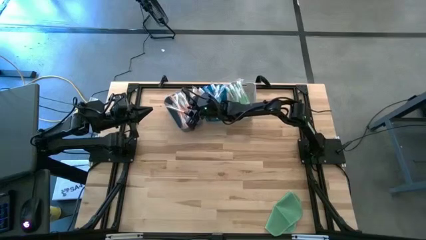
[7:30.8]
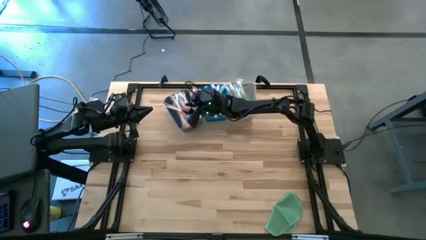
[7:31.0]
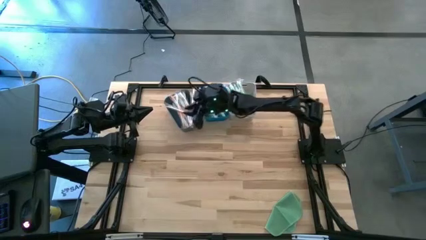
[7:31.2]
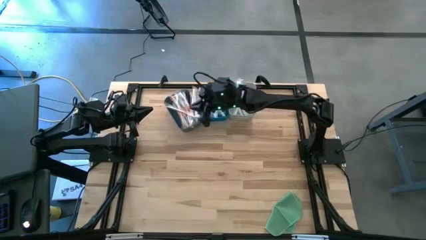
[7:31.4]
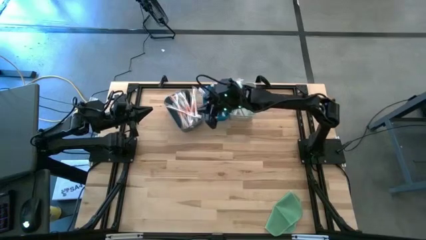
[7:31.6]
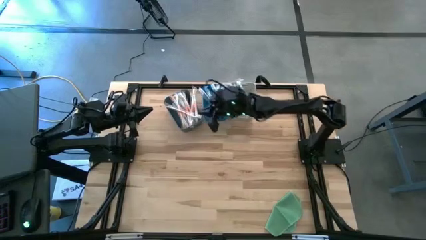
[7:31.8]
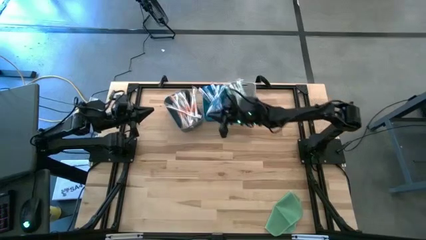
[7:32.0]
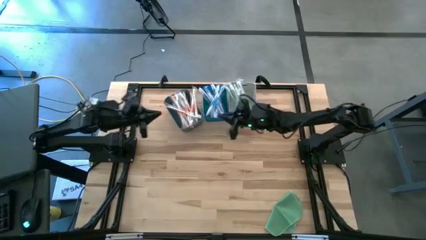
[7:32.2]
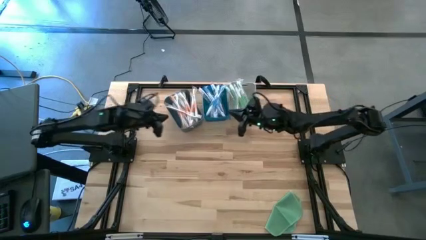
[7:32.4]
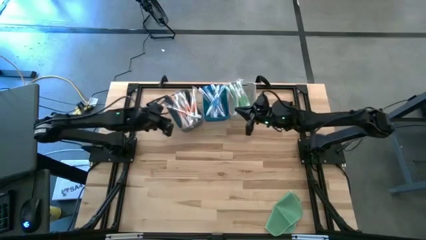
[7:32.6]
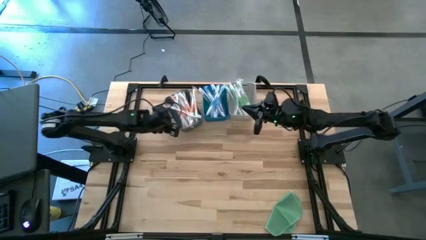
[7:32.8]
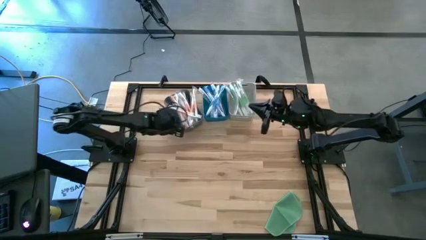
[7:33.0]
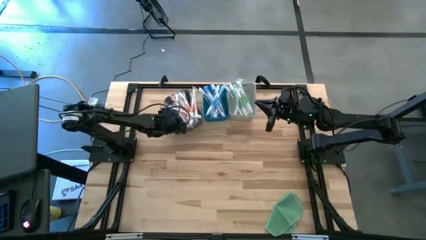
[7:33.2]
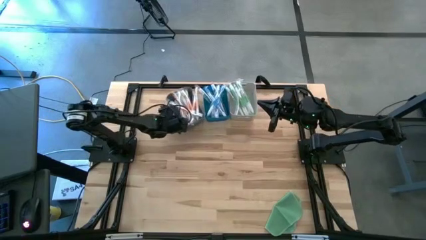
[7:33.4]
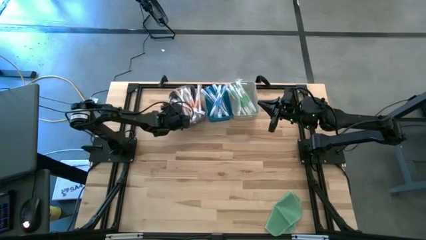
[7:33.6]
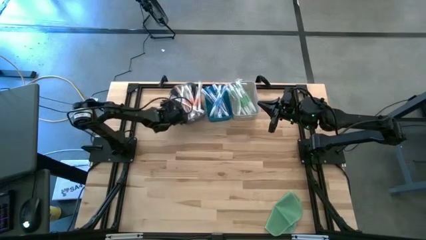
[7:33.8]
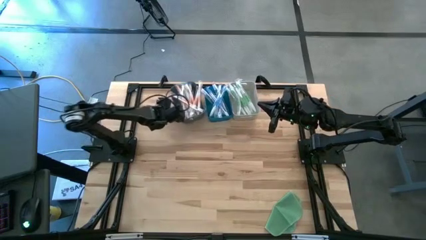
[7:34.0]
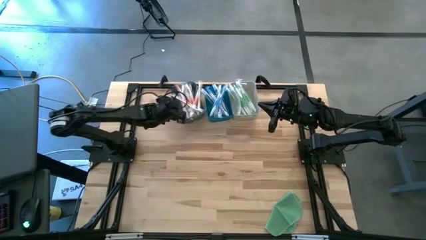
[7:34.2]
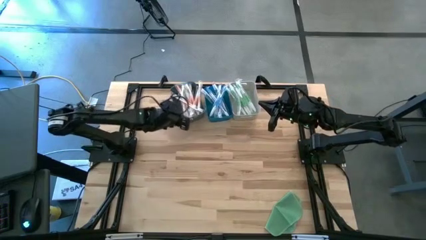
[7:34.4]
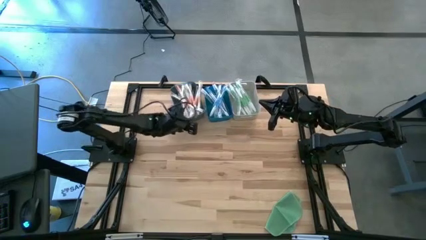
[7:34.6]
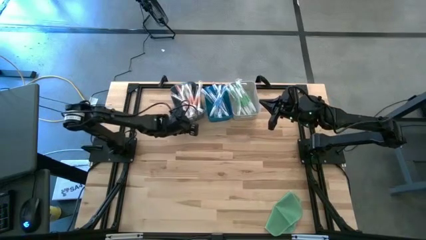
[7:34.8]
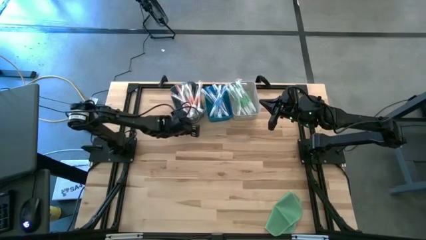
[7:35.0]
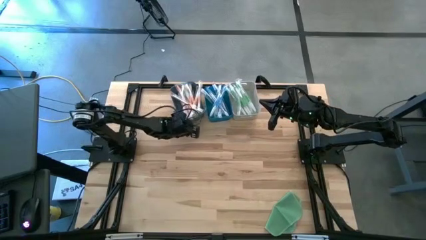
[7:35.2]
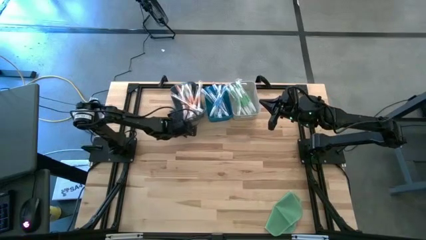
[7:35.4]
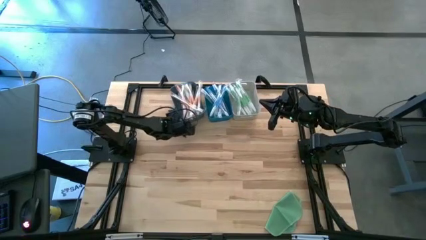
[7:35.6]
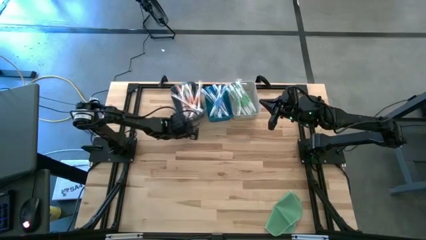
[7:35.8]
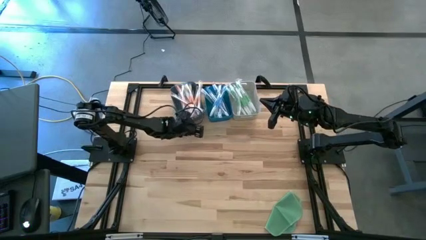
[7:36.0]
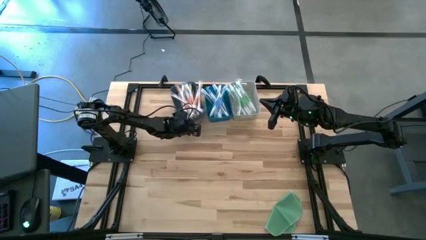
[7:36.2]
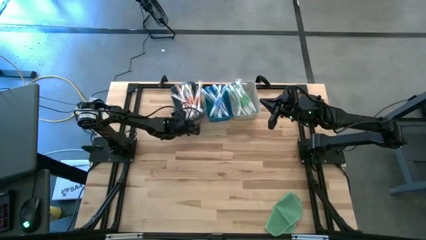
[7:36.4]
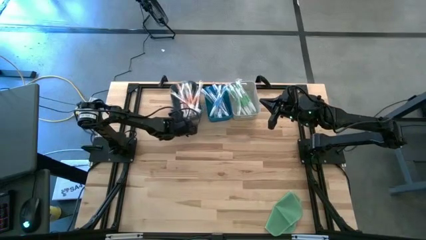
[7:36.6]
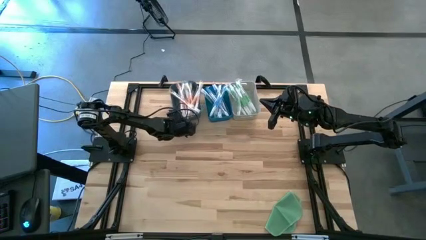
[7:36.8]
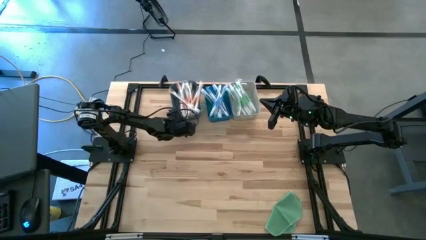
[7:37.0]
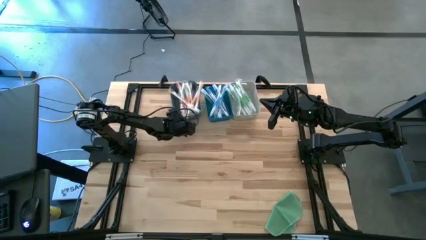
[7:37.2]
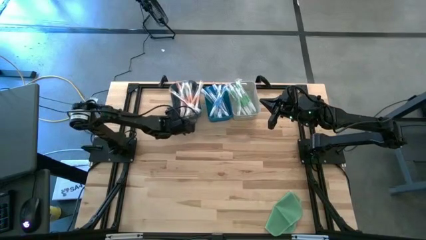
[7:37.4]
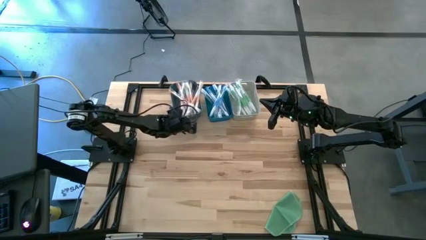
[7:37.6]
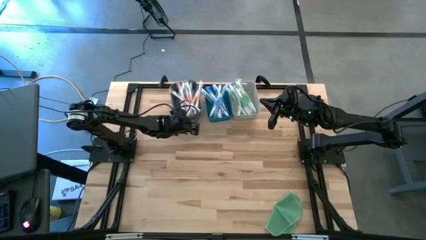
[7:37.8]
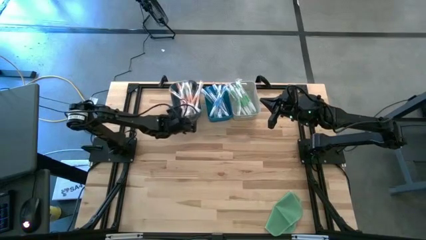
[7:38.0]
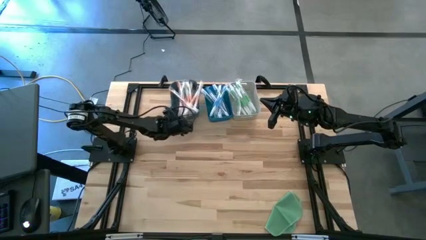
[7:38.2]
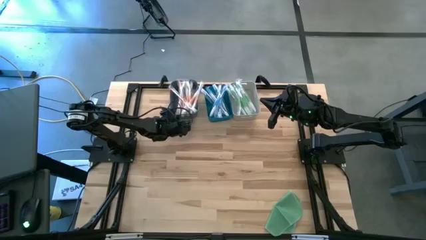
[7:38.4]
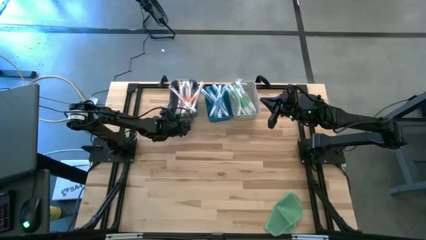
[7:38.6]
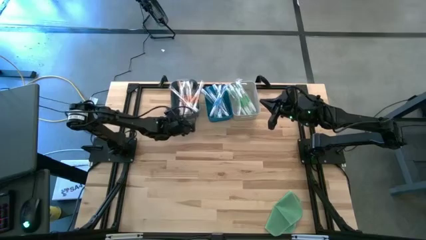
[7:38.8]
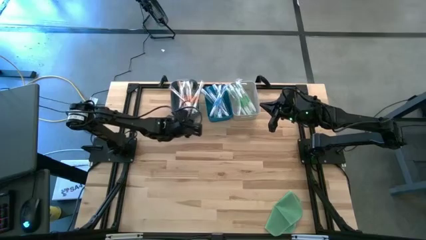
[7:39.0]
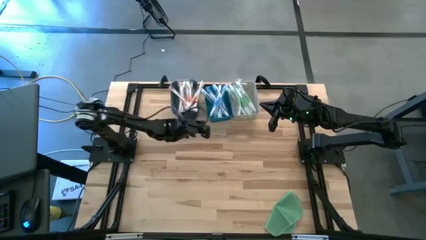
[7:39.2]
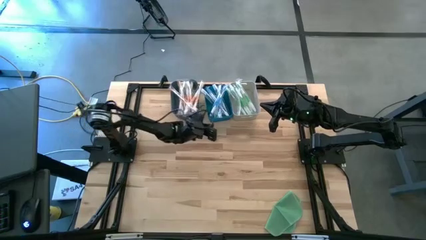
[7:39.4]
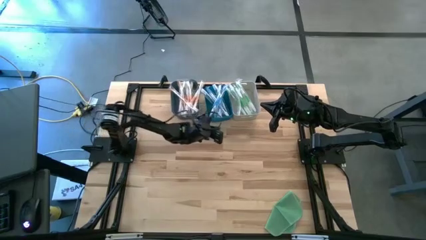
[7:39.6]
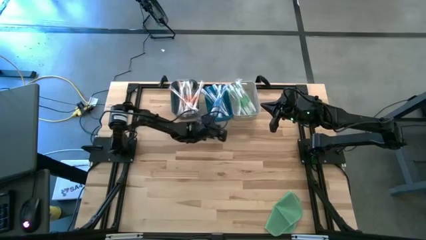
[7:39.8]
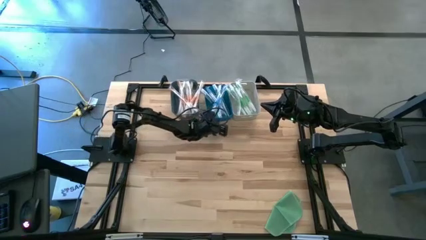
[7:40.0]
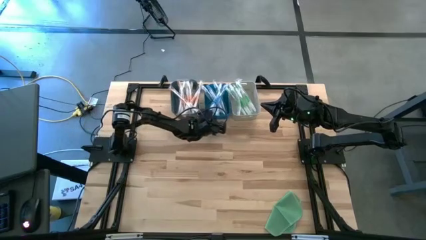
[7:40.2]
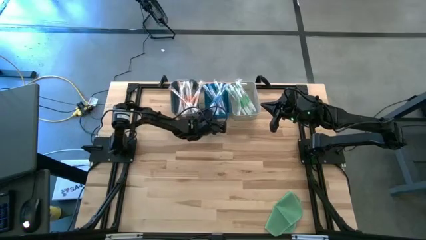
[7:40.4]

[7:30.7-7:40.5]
Task: Pick & Place Toothbrushes
Adjust the bins

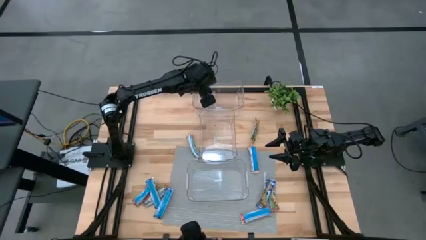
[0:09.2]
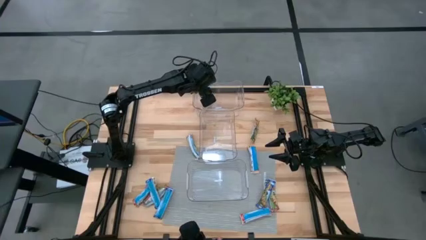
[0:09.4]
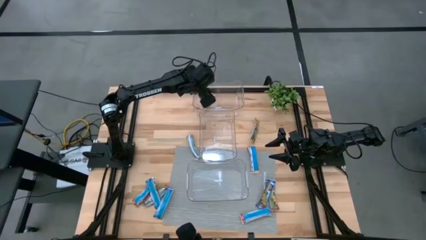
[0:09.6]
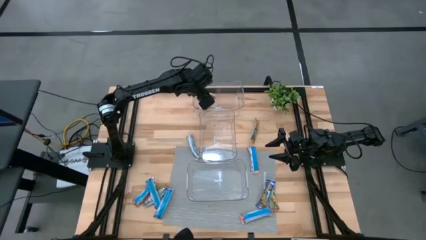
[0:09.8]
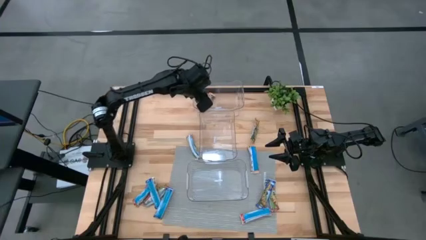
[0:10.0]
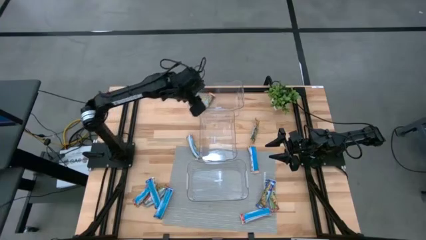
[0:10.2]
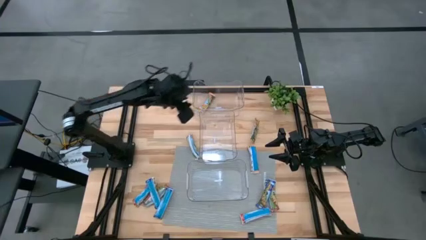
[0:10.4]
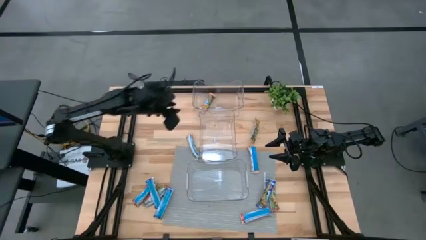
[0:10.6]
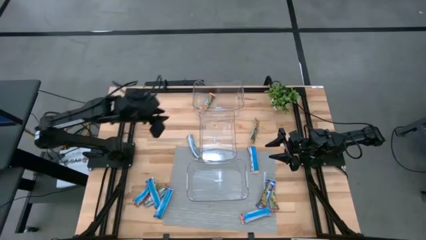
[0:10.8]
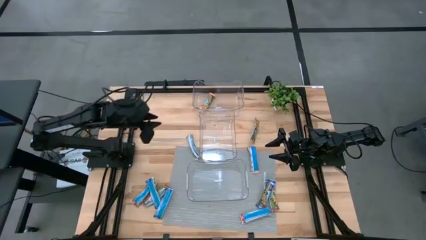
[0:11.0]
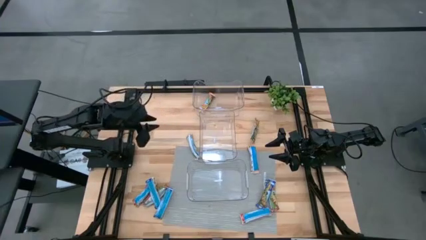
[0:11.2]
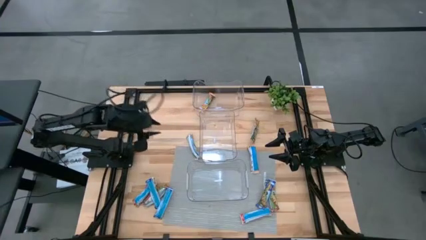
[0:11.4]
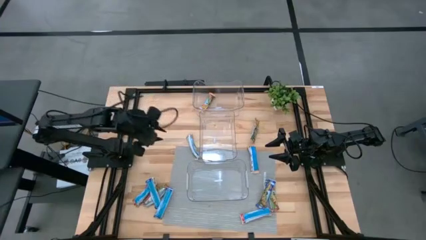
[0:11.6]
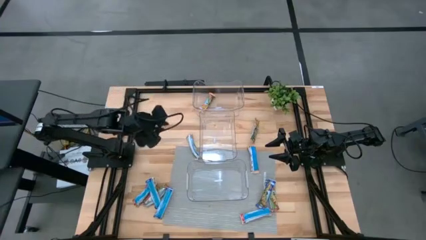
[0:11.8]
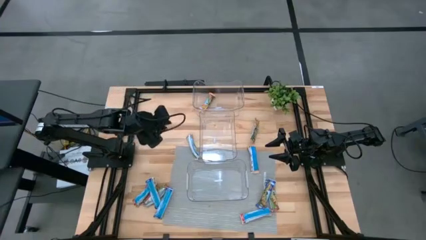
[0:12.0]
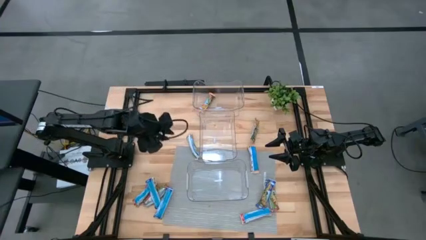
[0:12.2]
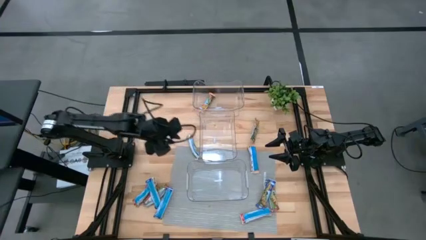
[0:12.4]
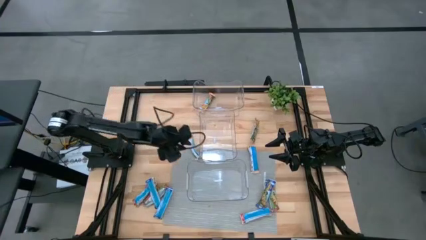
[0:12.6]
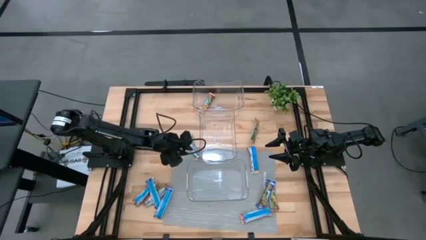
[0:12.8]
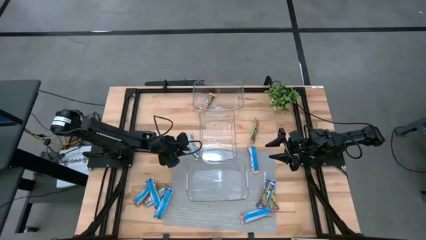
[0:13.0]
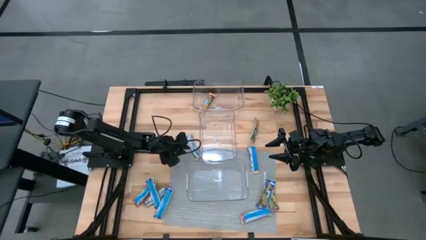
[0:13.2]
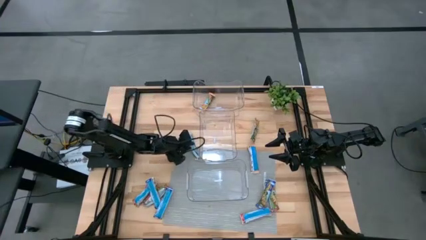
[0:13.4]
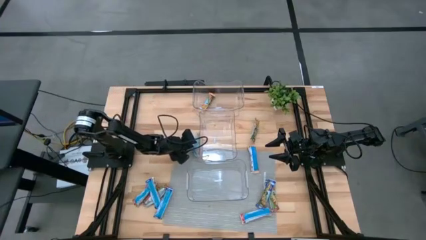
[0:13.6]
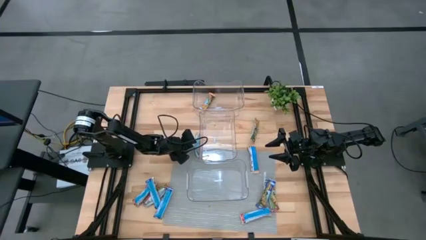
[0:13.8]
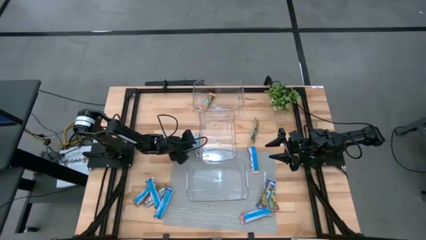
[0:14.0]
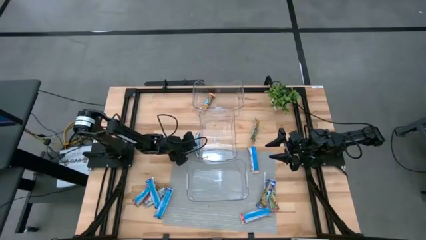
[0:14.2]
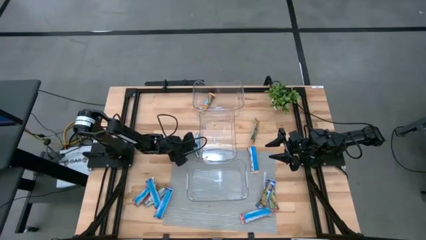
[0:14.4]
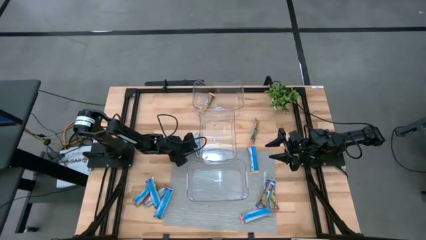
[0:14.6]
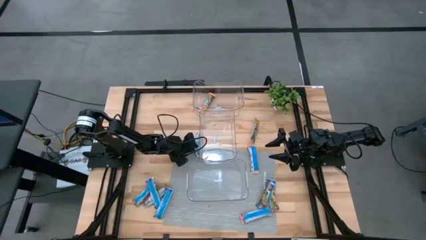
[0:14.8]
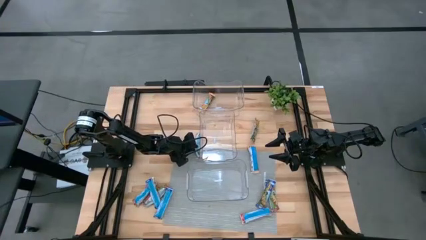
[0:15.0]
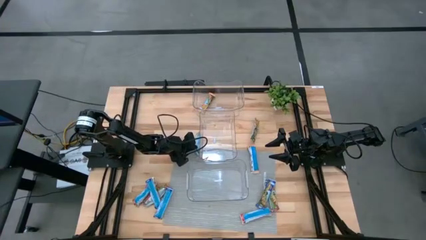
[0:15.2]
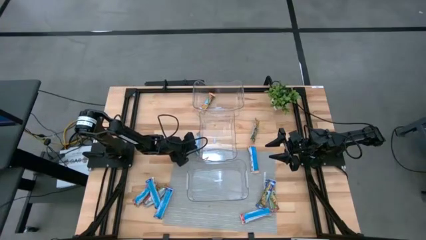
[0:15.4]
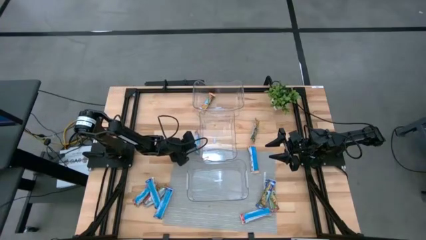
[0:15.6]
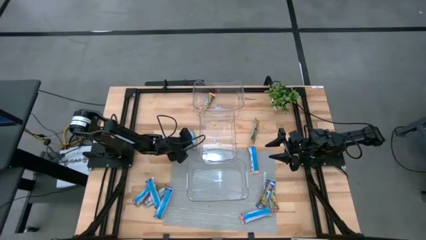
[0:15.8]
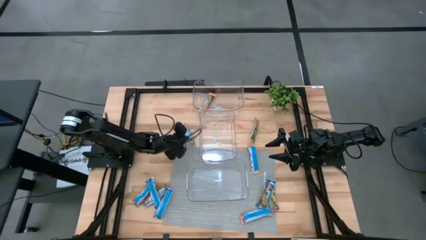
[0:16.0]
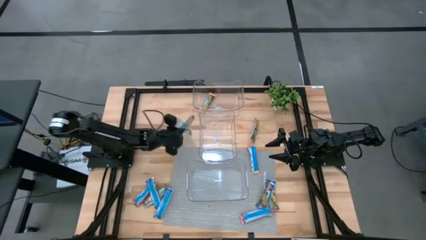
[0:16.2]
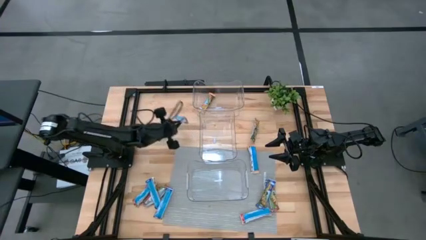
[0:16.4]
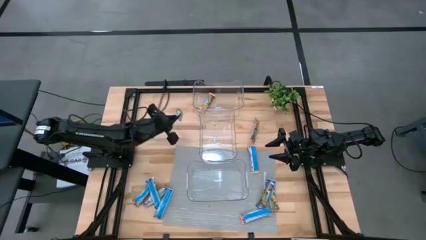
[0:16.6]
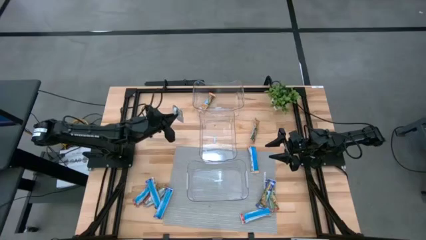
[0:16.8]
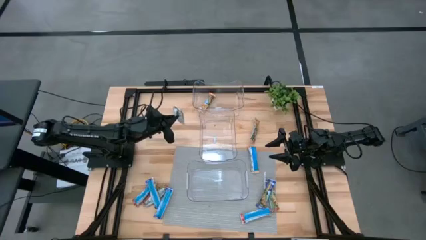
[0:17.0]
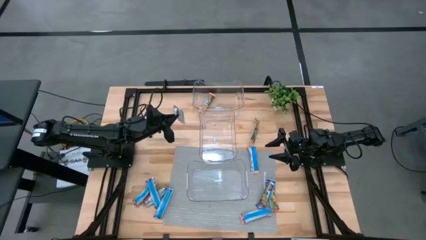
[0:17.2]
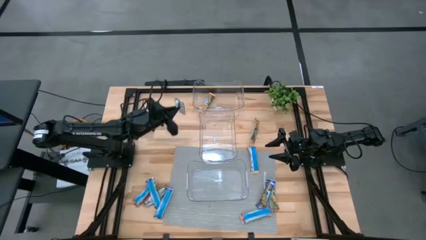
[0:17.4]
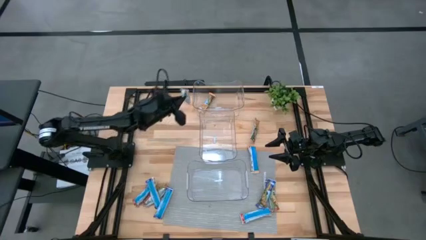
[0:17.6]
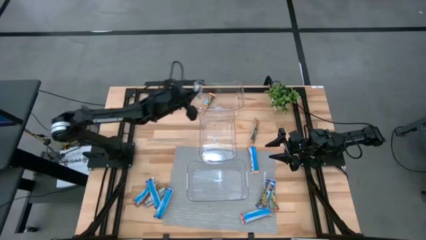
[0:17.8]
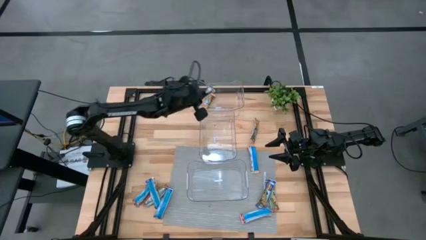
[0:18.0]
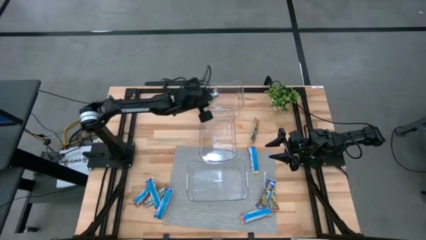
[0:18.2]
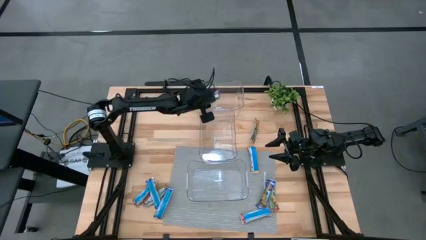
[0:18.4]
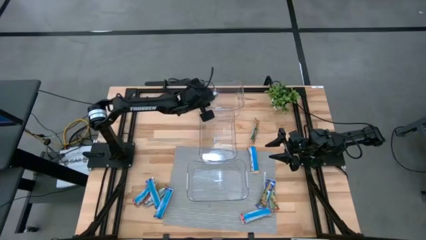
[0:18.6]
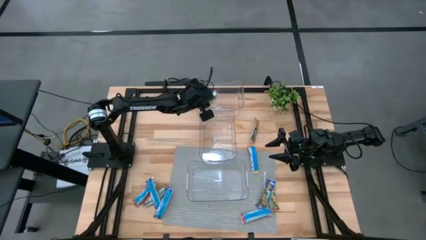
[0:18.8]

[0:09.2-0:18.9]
Task: Pick and place Granola Bars by type
Put the yellow granola bar into the top transparent bin
